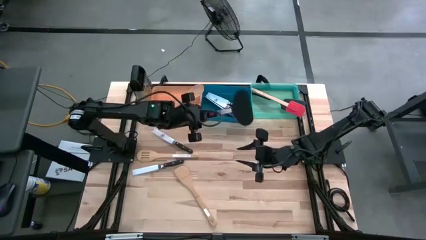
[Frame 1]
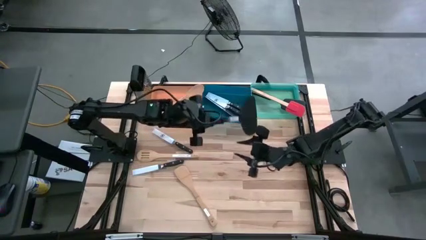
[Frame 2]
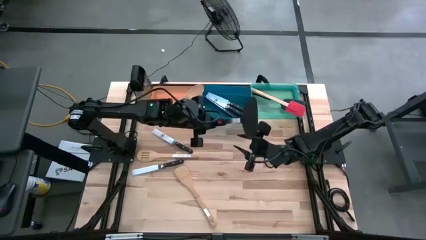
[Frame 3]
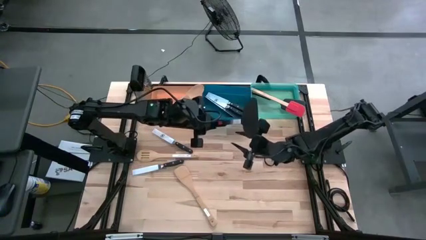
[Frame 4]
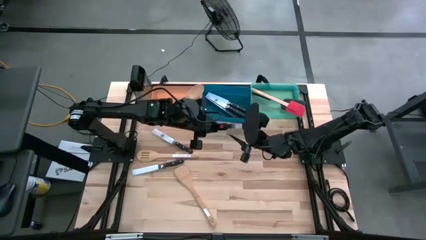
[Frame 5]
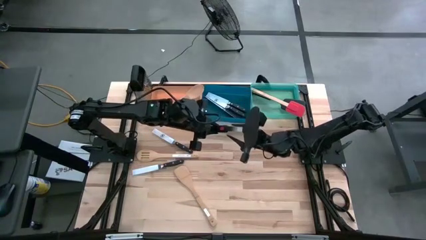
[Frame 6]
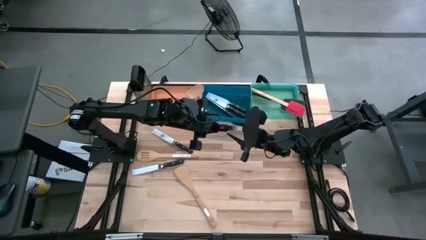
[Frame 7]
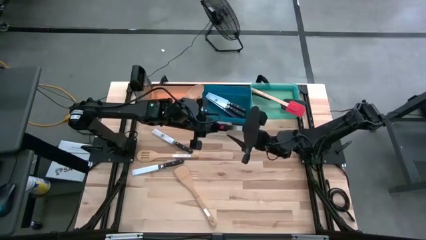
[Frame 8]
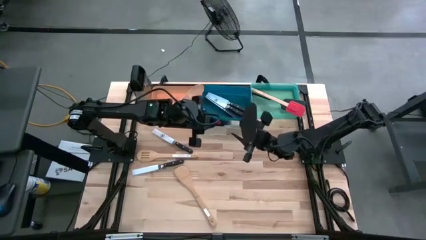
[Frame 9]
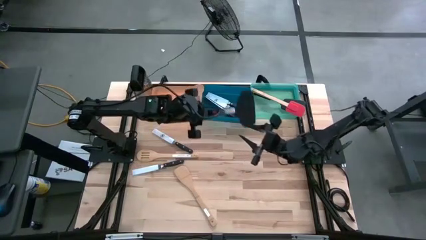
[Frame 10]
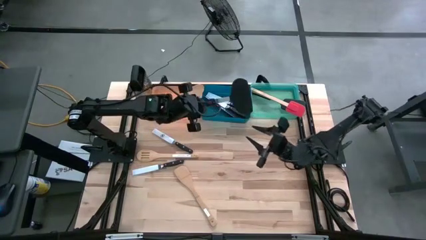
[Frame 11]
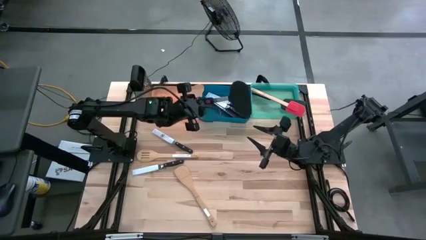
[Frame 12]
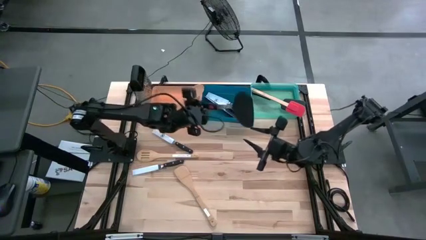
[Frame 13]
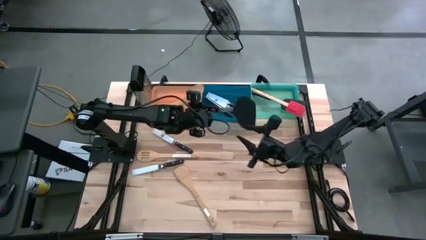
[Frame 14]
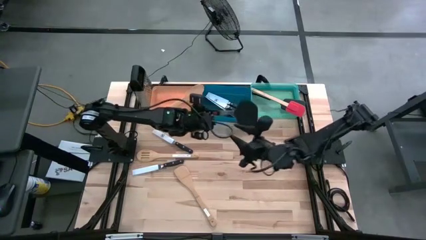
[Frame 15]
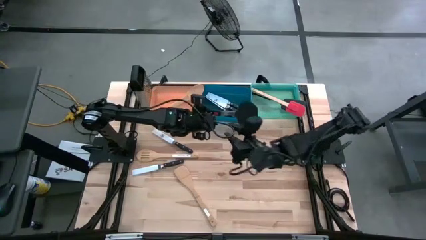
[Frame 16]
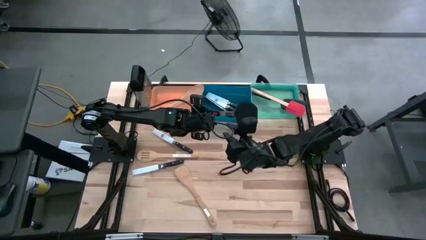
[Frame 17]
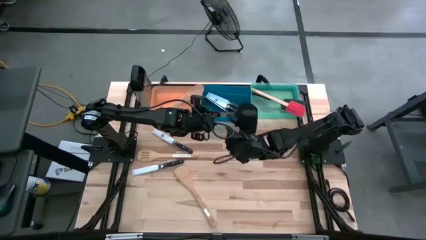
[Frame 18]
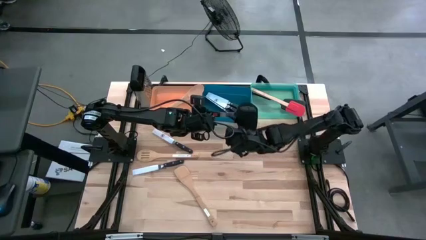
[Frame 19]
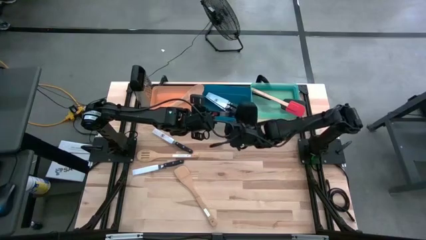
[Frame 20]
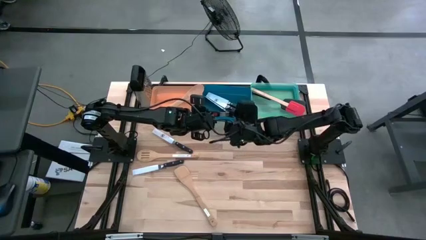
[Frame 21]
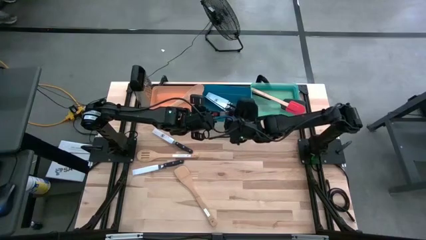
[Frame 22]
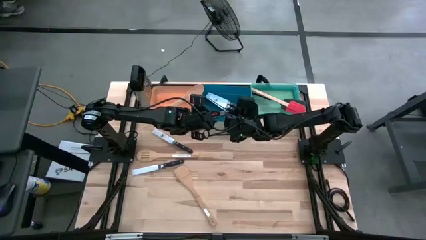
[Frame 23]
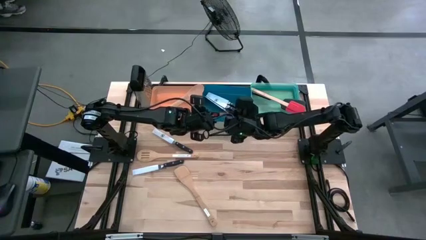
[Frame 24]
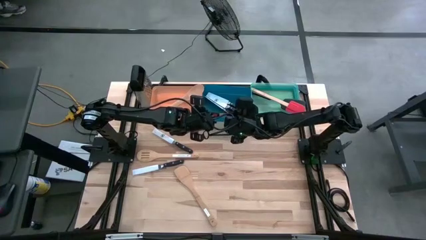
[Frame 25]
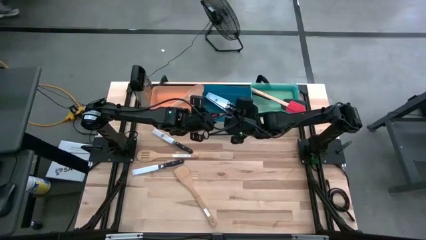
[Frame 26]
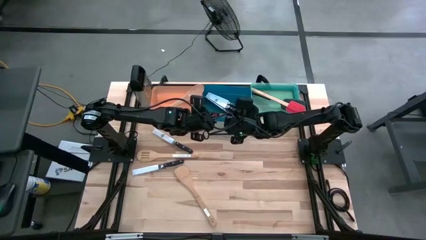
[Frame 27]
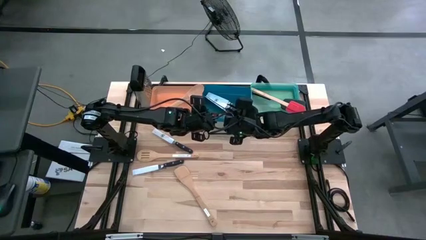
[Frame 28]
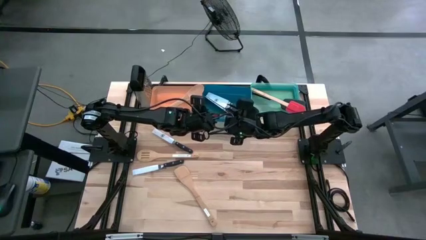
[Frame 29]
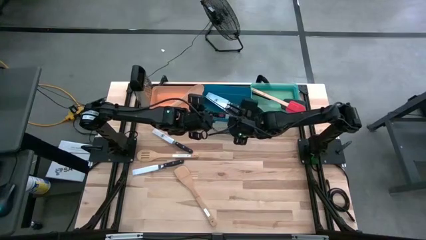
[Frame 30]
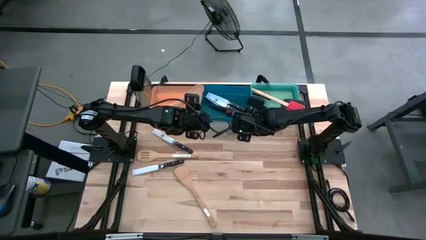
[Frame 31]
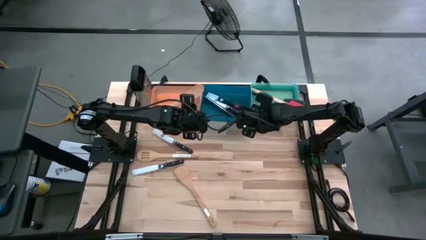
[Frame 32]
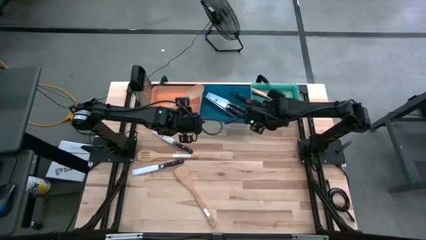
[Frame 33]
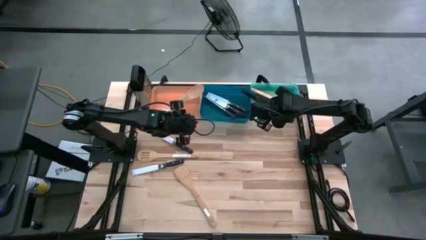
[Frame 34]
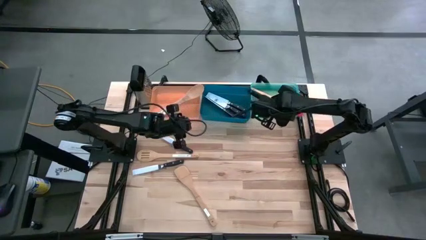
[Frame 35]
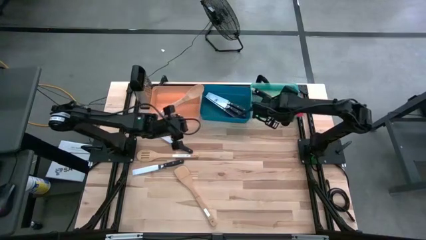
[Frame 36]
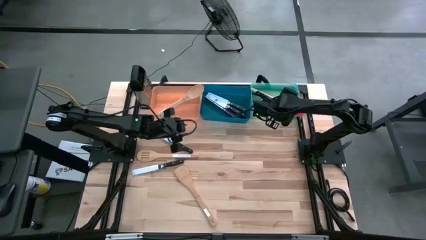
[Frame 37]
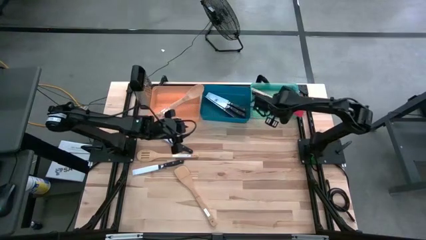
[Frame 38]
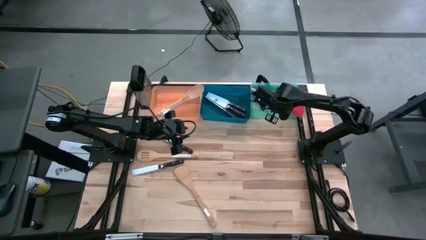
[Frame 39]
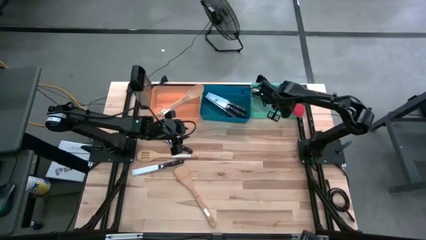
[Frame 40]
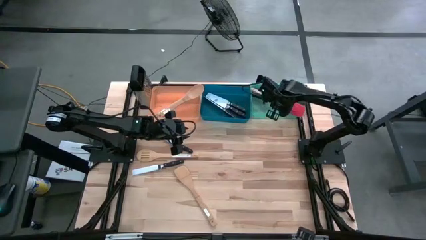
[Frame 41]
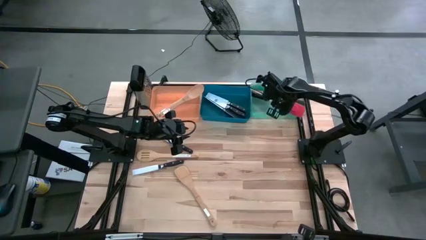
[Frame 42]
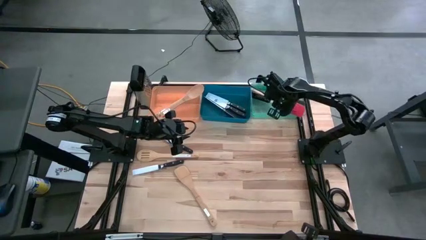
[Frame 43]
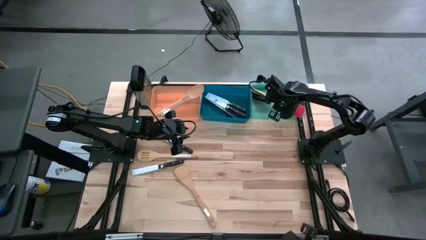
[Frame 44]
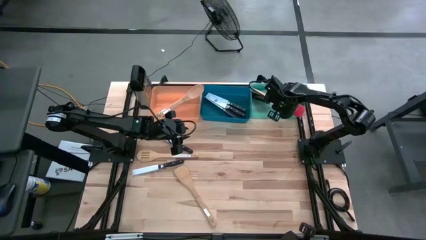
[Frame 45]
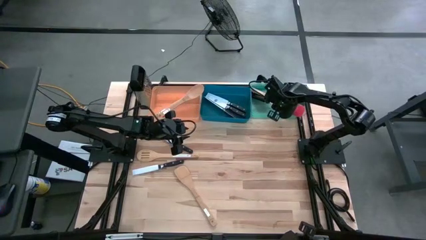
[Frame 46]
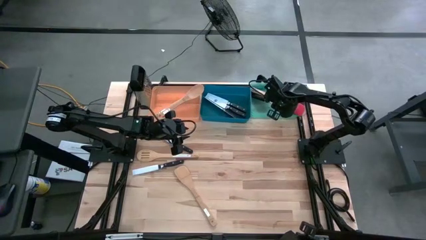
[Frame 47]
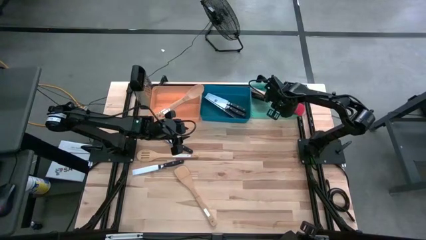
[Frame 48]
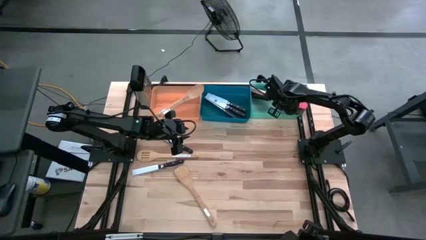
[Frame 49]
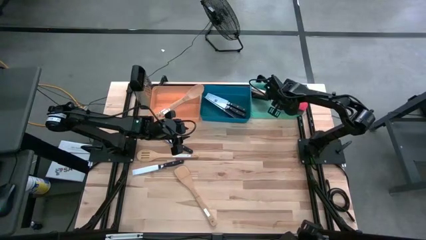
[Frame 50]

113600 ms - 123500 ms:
Task: Pick & Place Kitchen Items
Put black spatula into the green bin

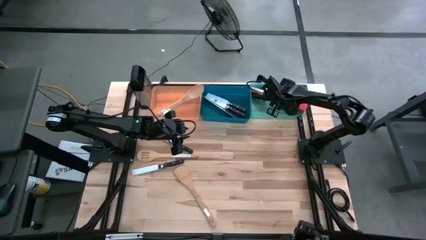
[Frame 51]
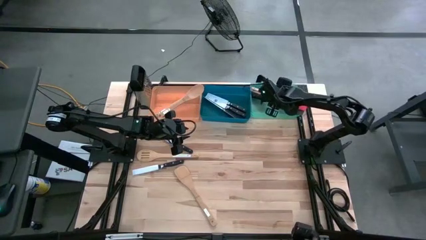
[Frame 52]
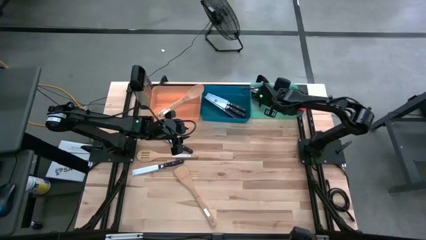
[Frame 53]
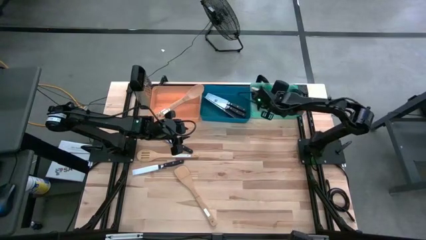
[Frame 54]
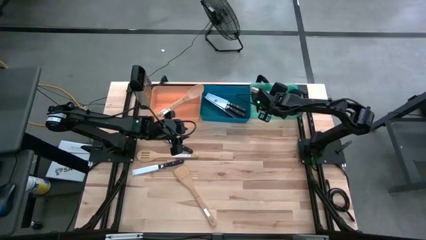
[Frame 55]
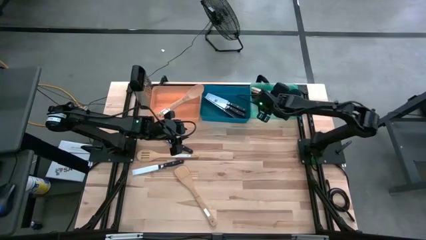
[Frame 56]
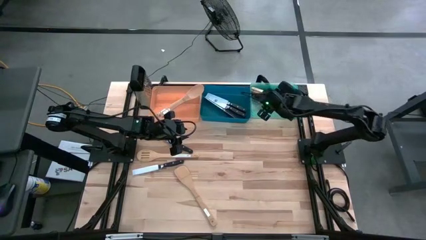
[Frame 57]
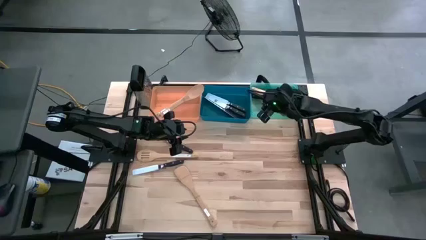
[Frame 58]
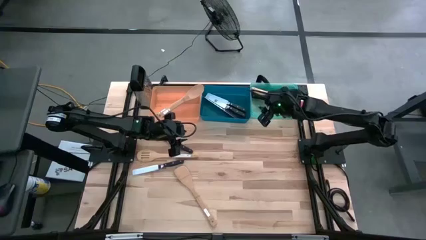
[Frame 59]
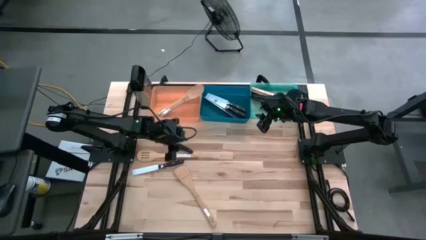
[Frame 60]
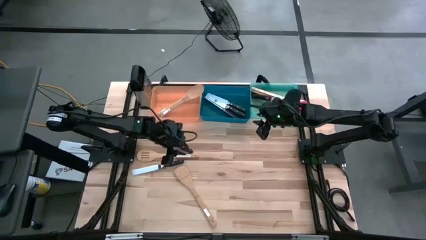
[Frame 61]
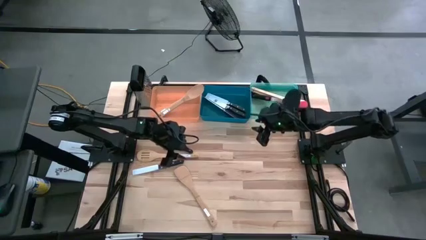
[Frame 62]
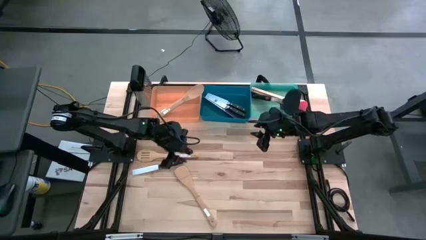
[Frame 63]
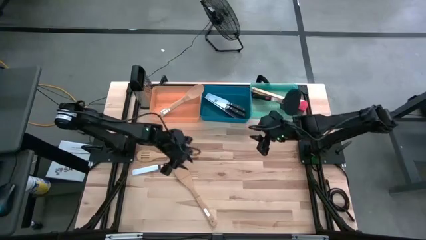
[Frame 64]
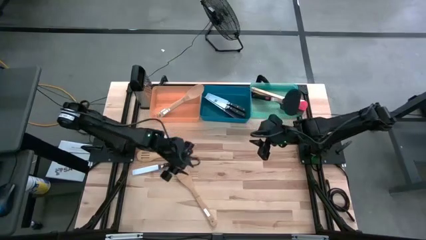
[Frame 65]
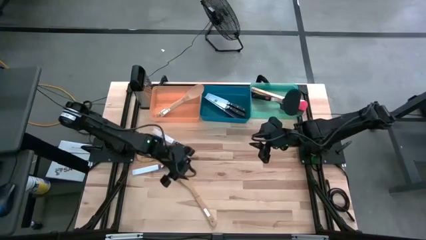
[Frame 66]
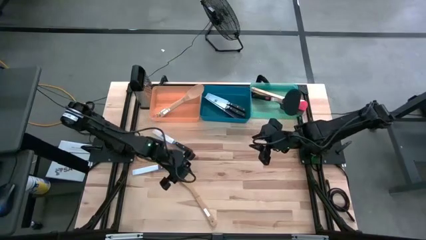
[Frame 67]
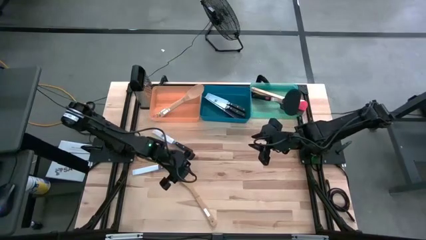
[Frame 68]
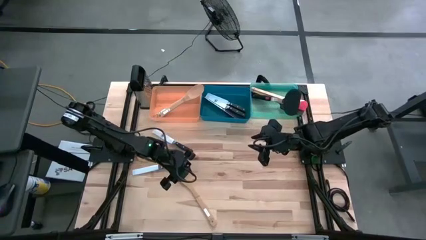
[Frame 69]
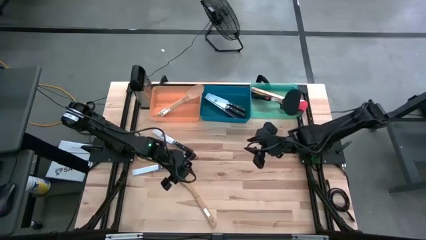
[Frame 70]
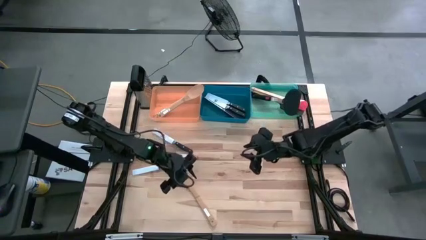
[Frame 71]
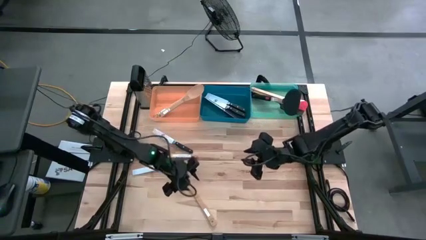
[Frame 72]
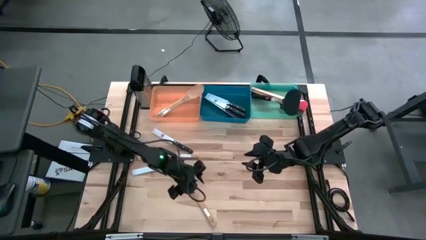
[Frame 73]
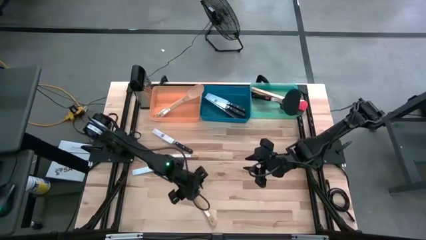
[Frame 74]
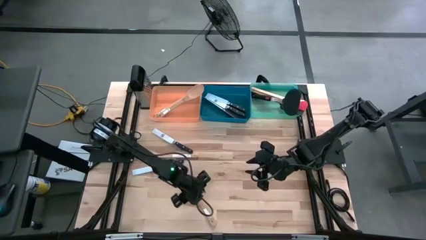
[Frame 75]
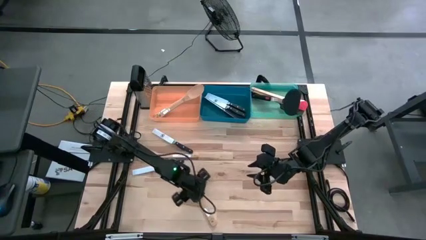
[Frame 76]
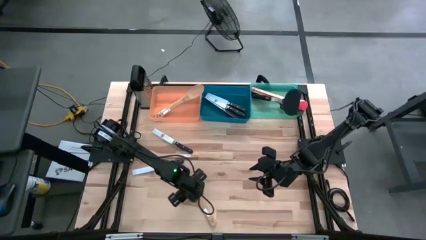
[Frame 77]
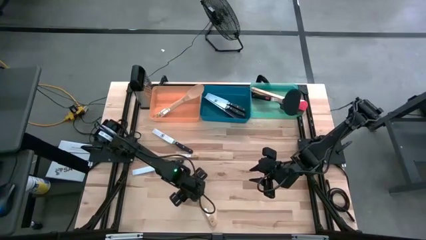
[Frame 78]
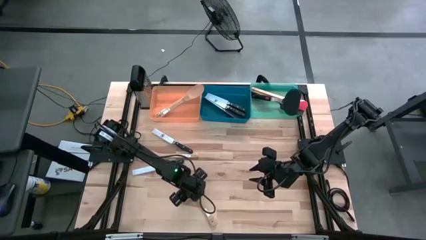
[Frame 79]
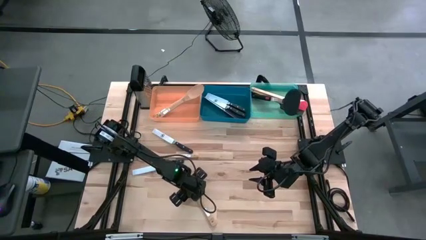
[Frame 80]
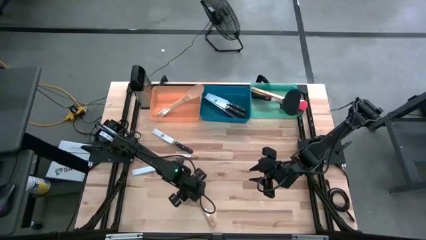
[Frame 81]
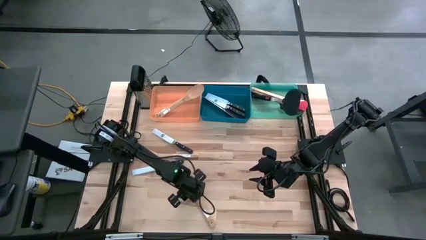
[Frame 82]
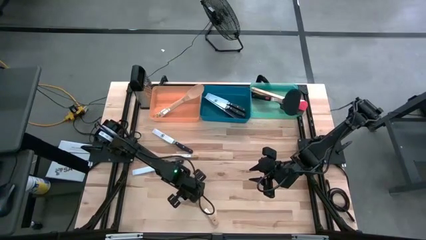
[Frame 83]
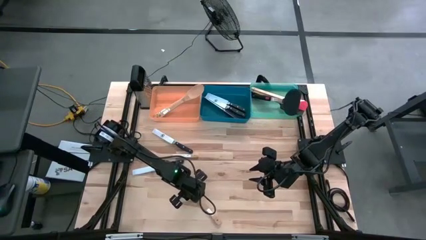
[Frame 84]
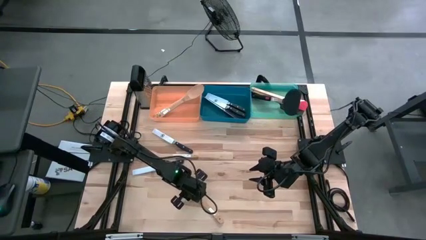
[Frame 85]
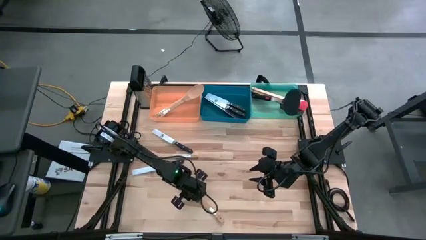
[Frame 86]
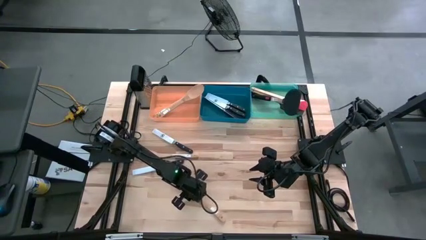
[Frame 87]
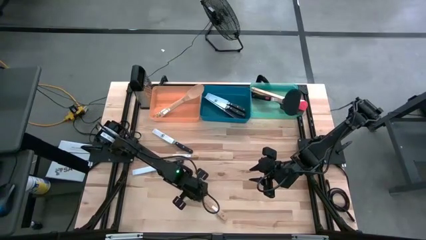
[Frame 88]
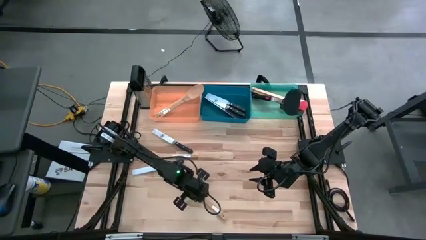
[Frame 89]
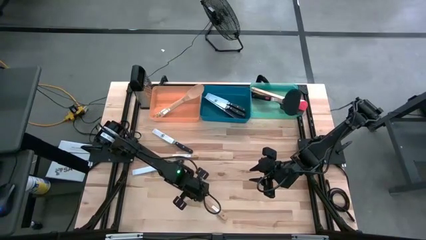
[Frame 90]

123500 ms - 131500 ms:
Put the wooden serving spoon into the orange bin
